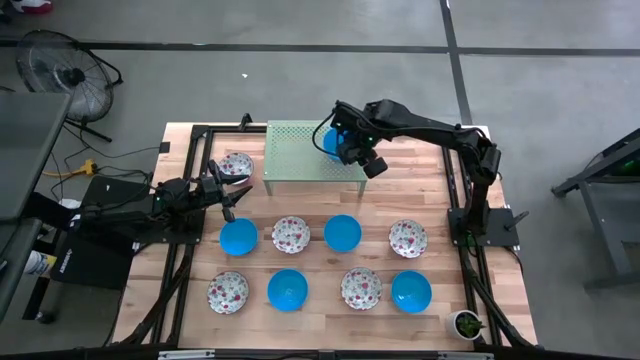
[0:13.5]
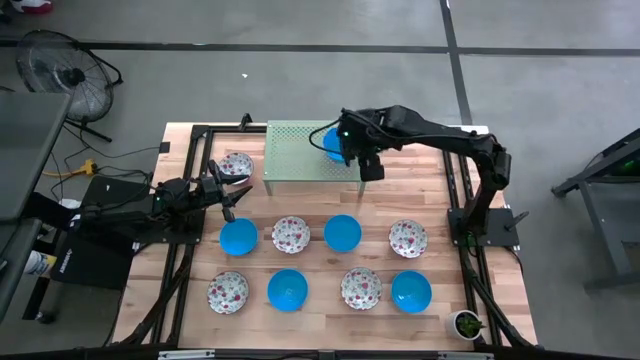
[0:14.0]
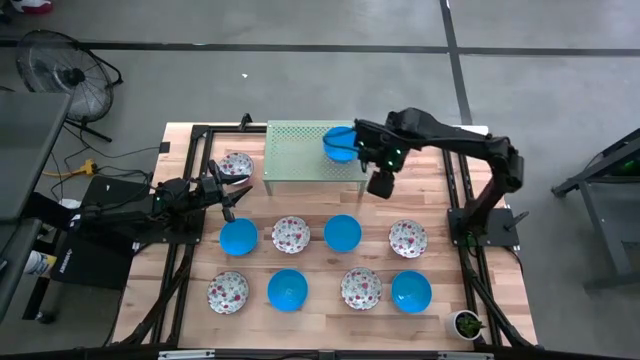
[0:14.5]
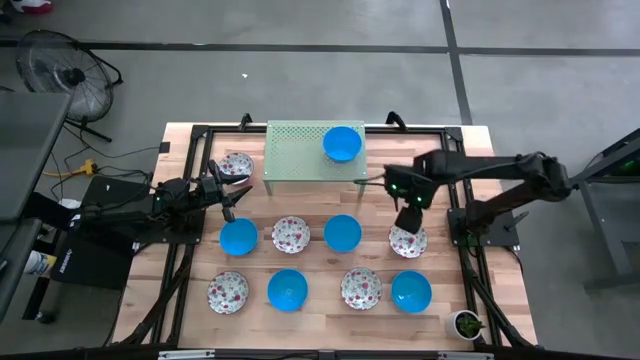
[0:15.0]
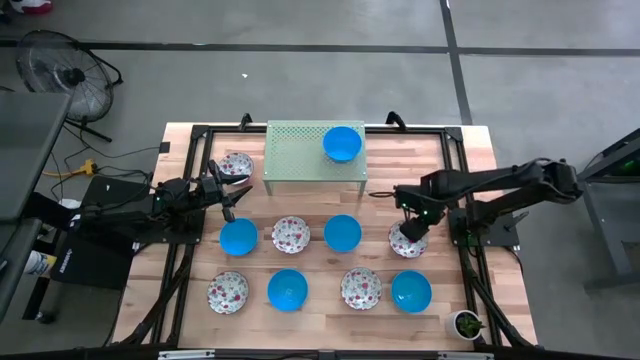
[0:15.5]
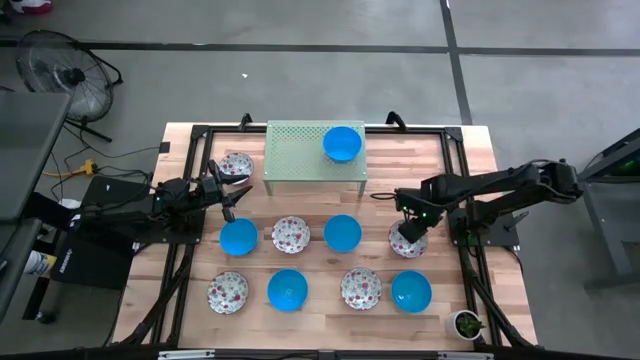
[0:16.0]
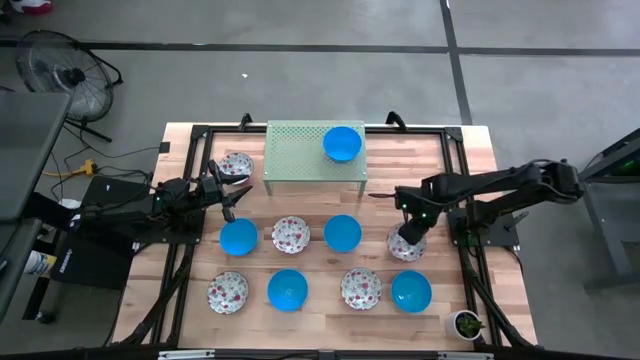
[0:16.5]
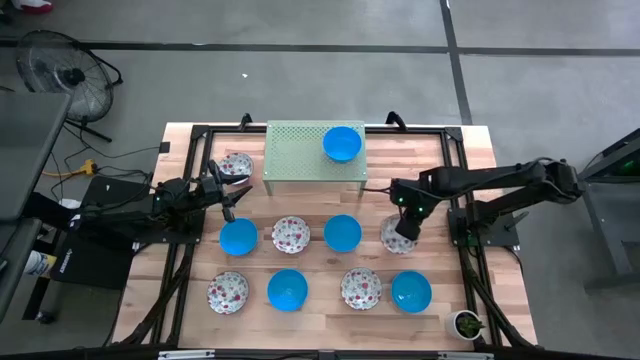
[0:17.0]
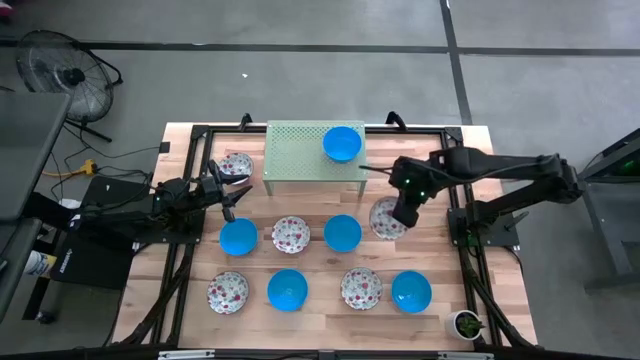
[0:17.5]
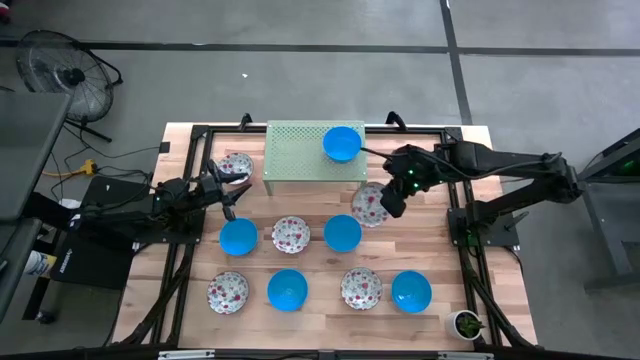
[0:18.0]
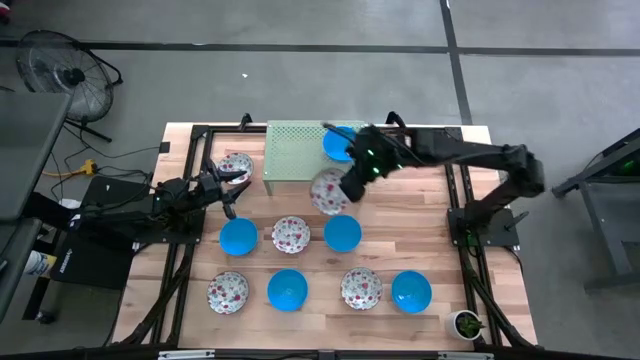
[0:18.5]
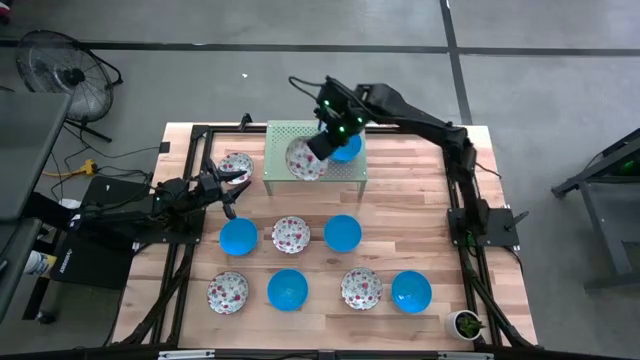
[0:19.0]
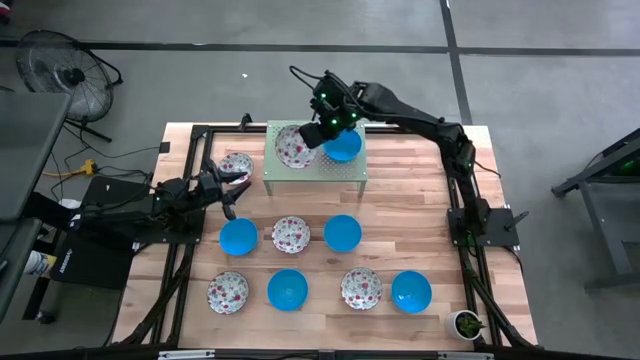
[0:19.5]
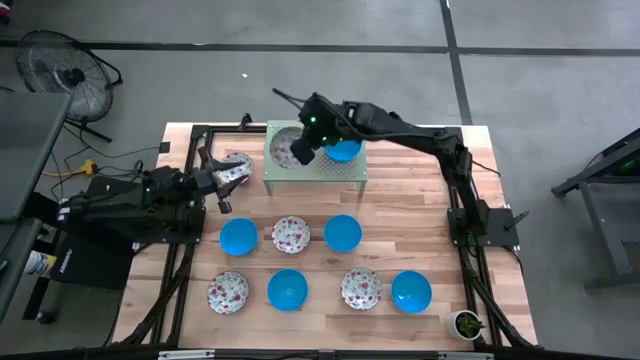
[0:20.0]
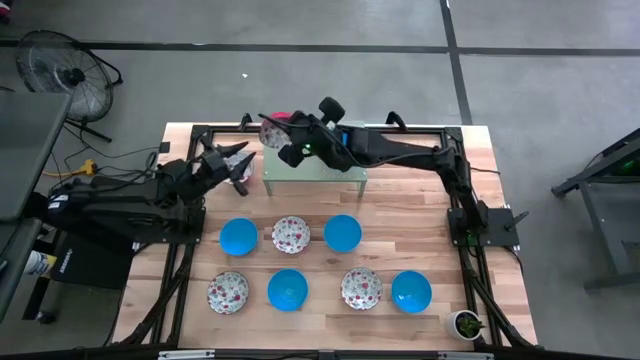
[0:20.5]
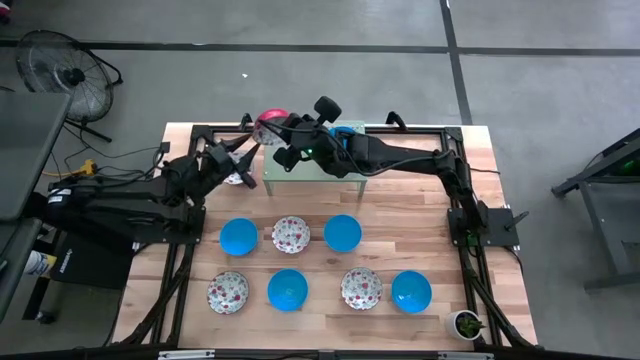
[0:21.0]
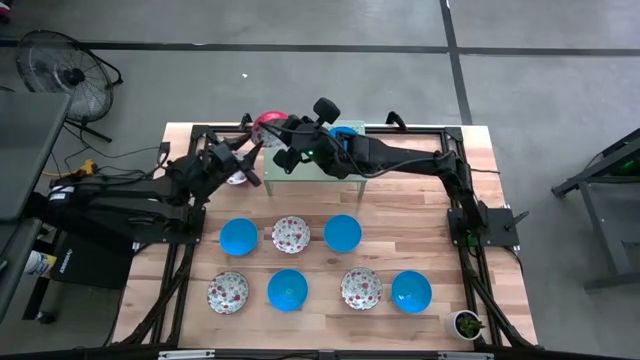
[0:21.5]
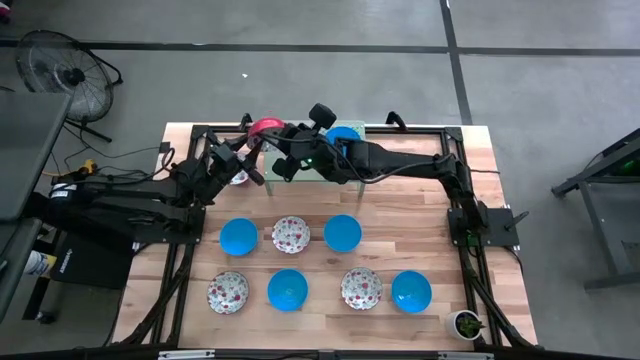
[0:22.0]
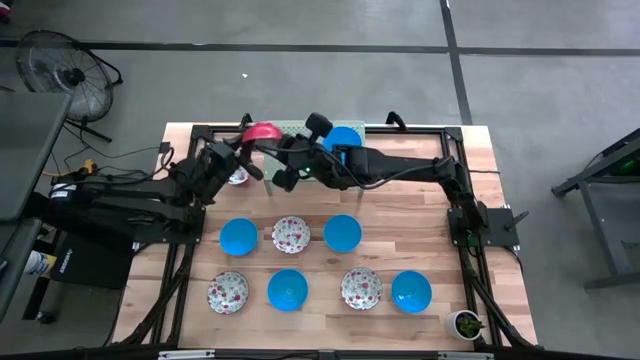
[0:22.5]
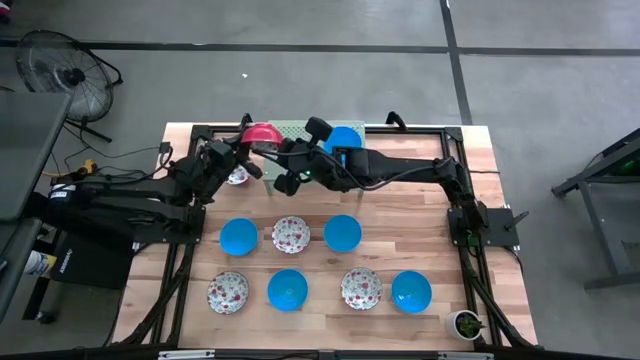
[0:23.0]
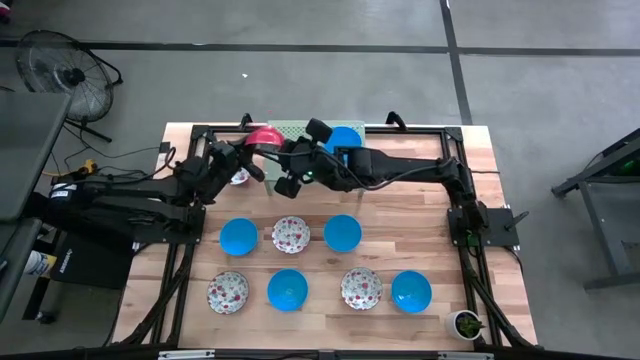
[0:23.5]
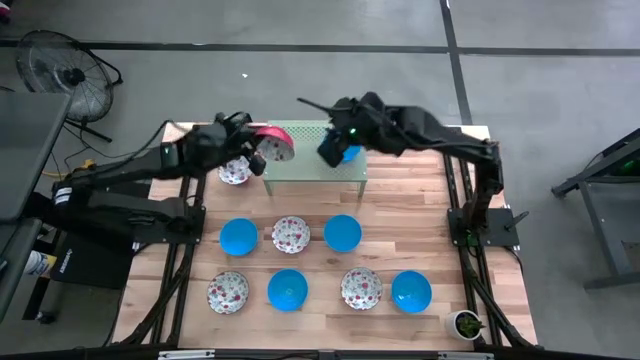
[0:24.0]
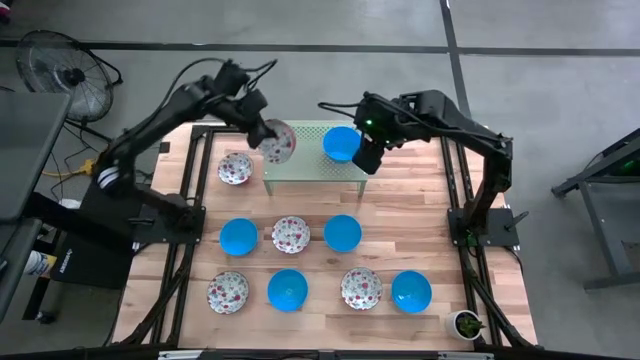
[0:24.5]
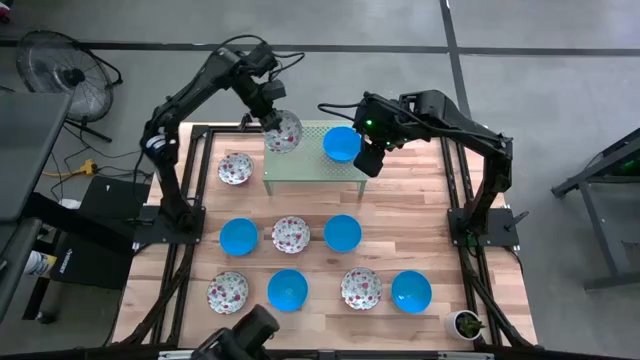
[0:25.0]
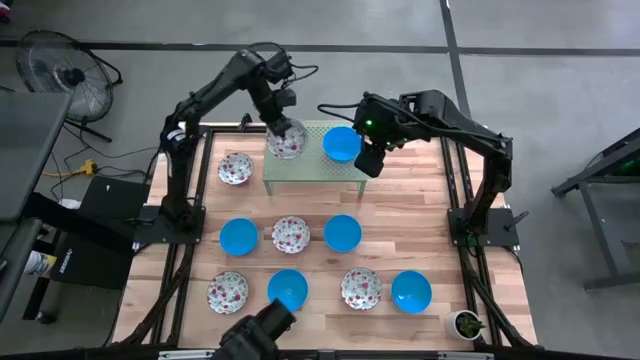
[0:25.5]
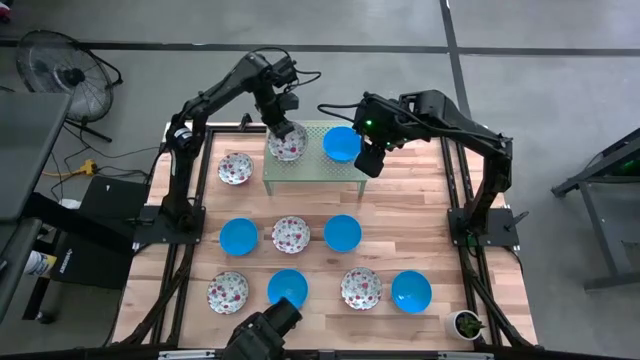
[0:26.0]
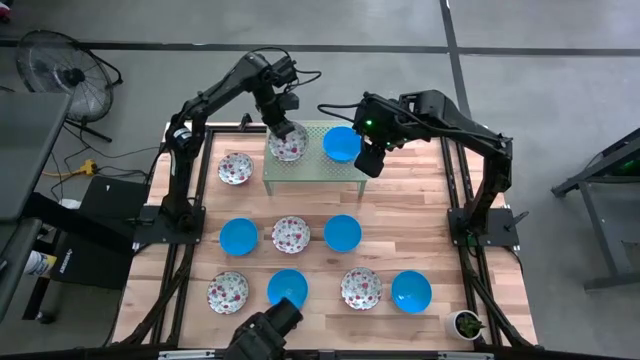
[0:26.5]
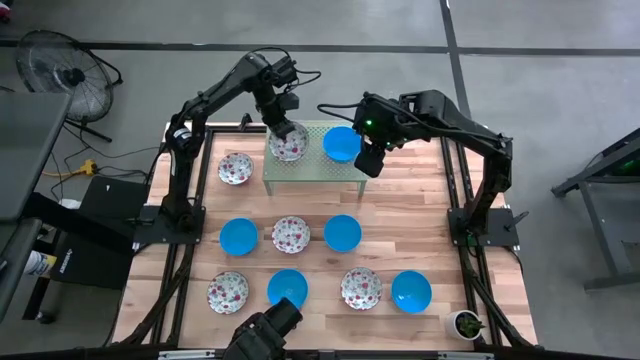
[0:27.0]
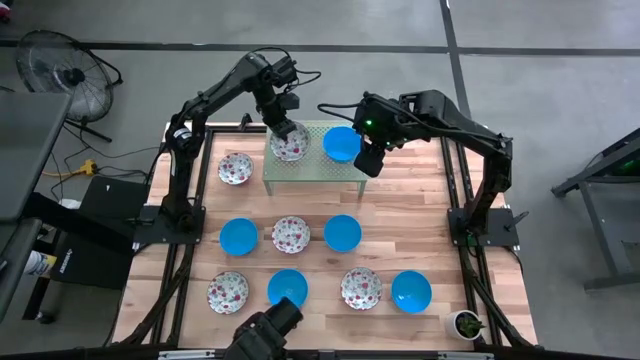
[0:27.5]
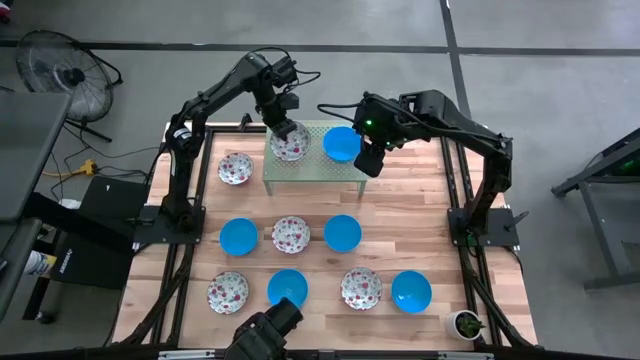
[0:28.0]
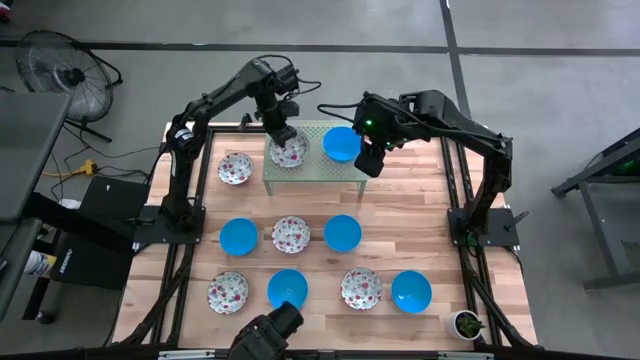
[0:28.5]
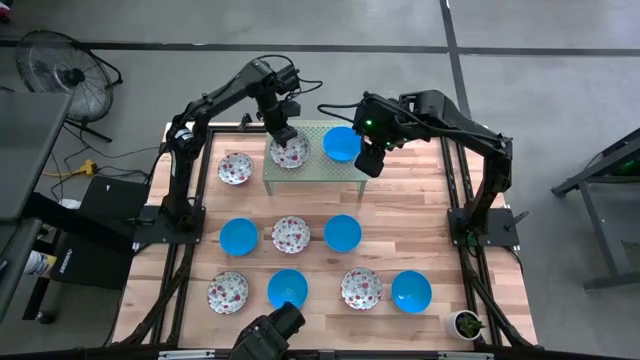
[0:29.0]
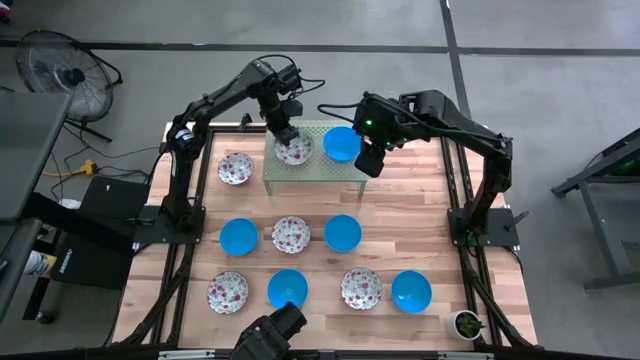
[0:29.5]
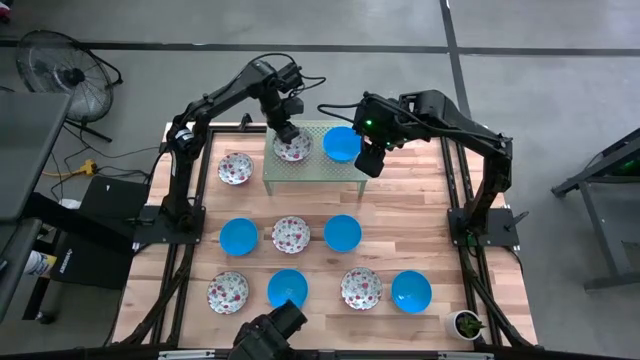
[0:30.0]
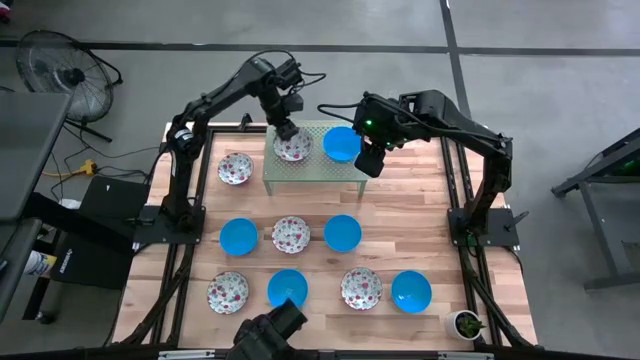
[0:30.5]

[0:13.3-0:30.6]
Task: Pick & Place Mini bowls
Put the white and red bowl on the shelf

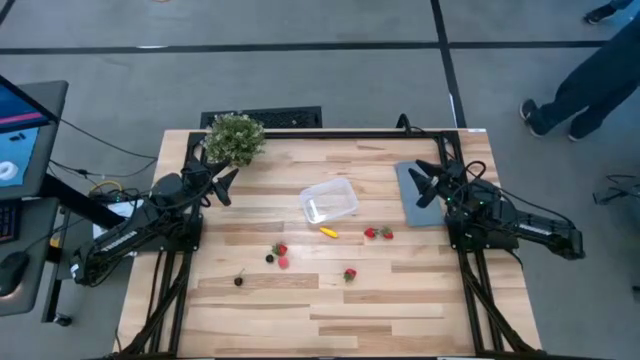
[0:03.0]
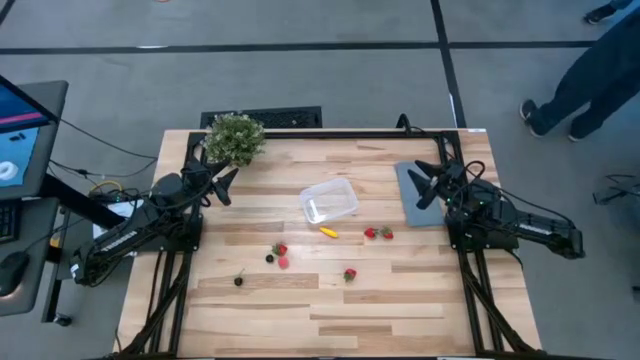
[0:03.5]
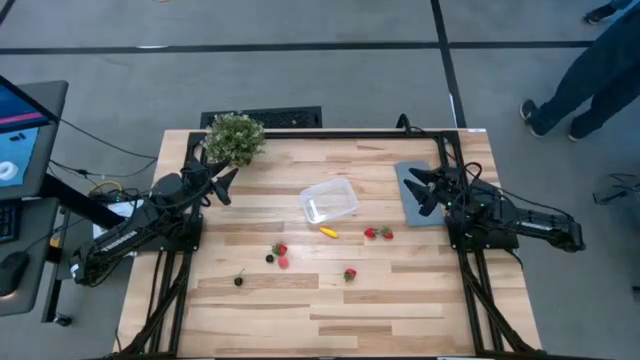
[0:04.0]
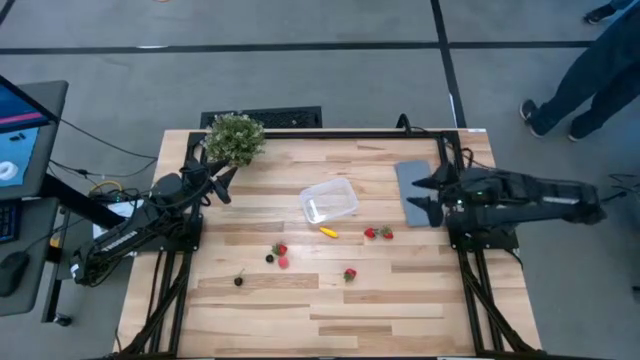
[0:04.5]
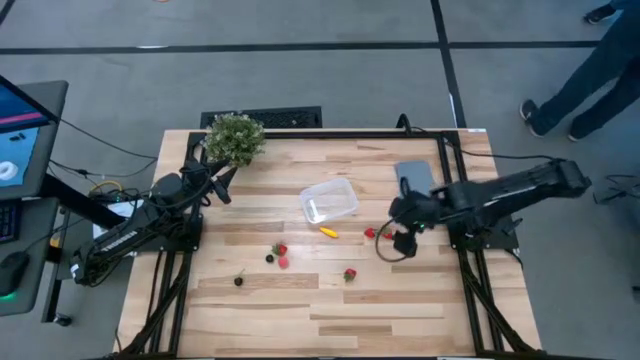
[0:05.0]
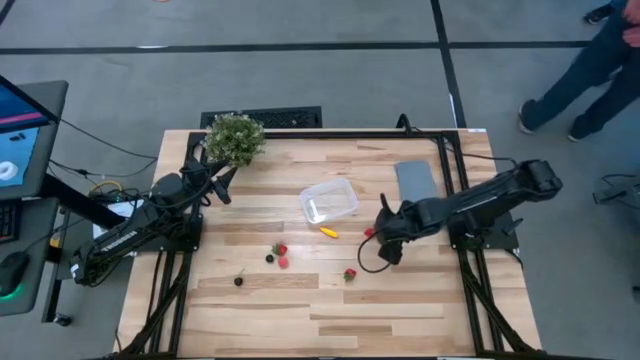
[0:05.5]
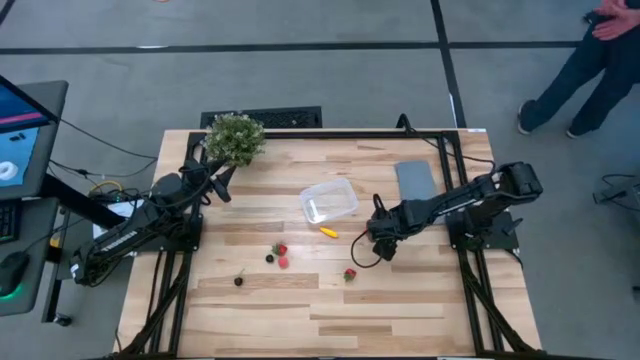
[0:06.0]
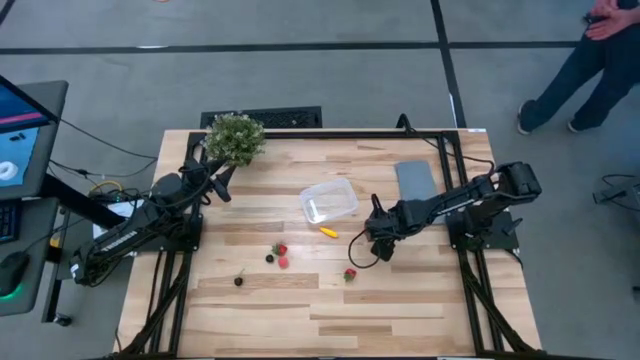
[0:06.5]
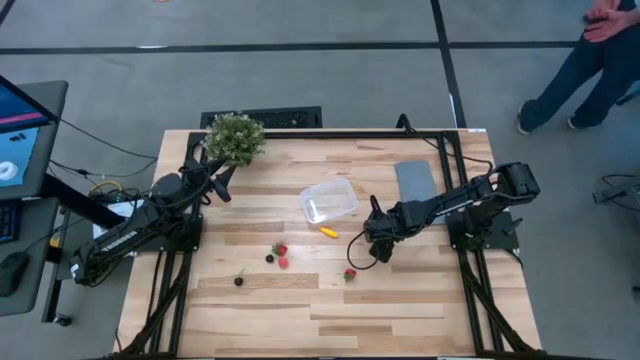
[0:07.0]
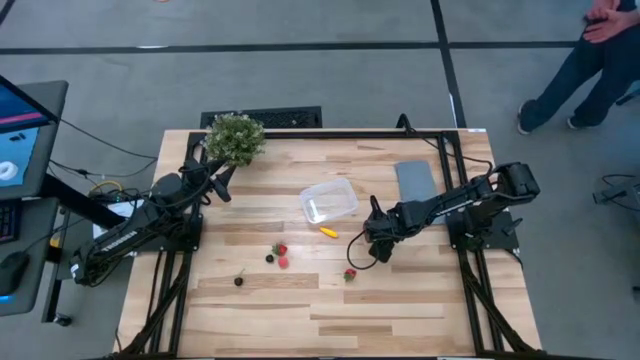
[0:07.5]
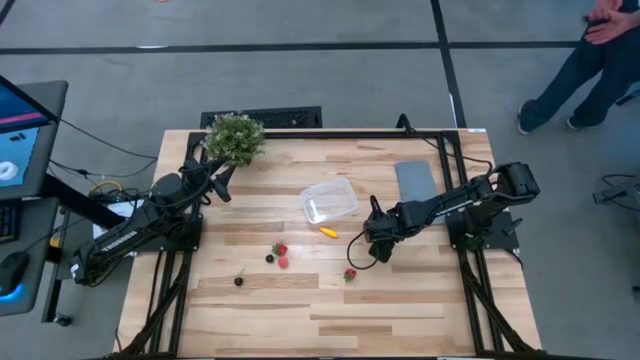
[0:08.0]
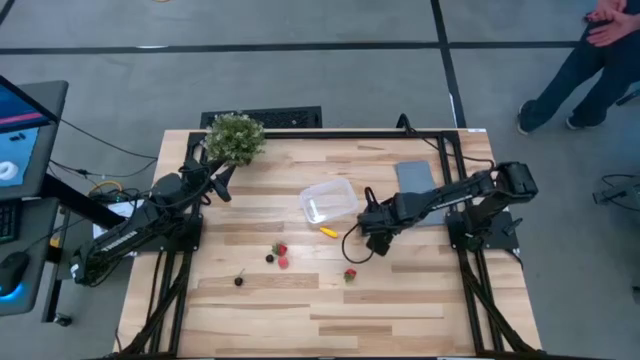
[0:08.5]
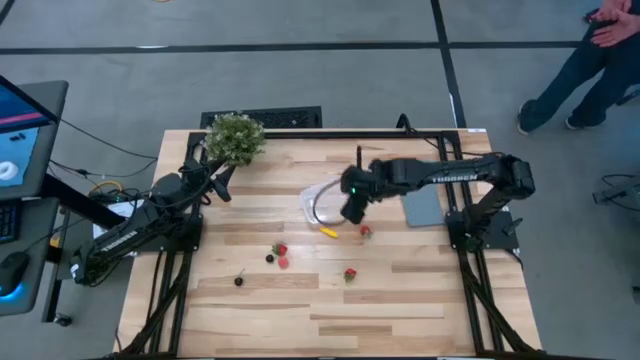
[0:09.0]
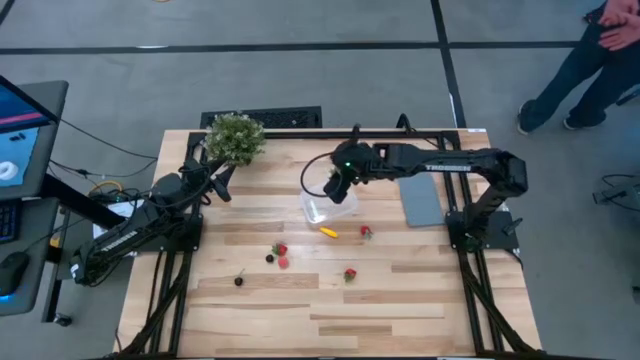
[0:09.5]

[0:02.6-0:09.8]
Task: Pick and placing Produce into tupperware
Put the strawberry into the transparent bin
